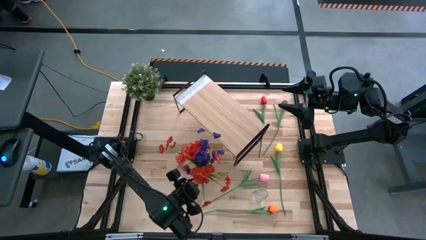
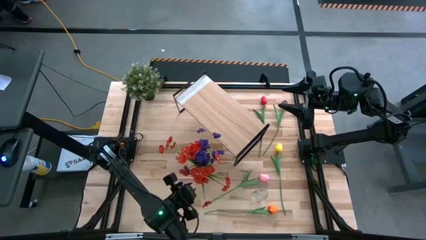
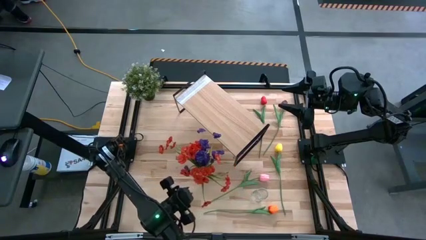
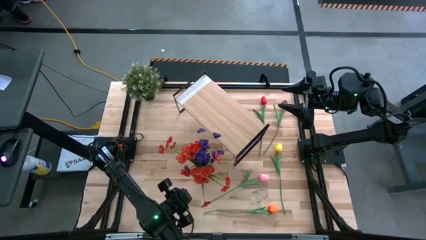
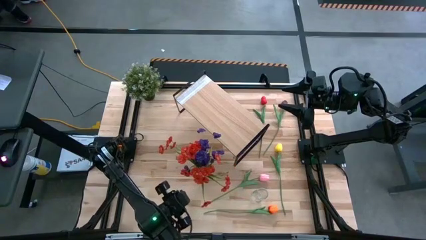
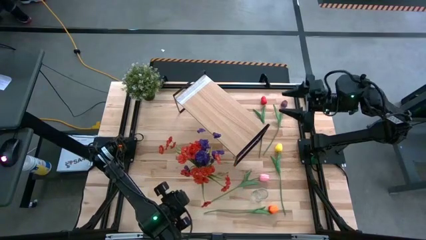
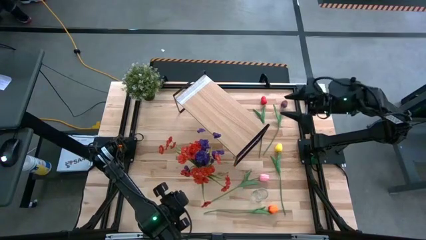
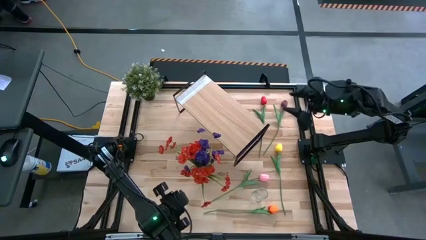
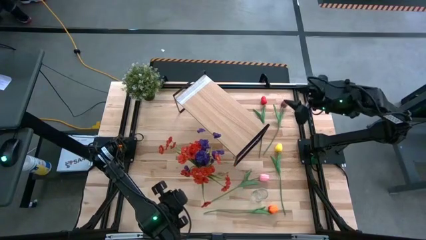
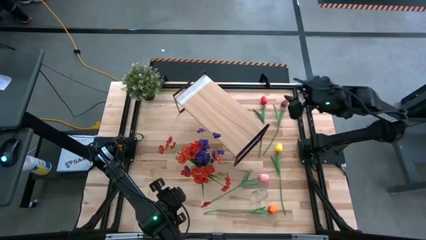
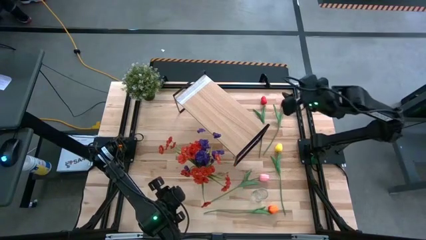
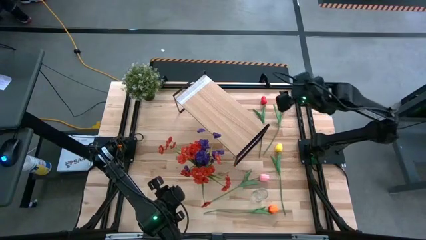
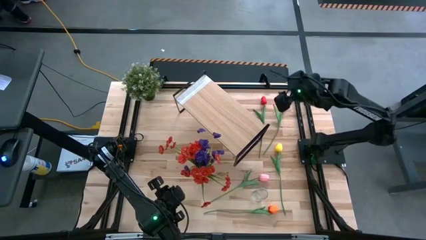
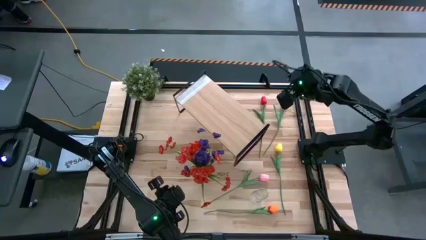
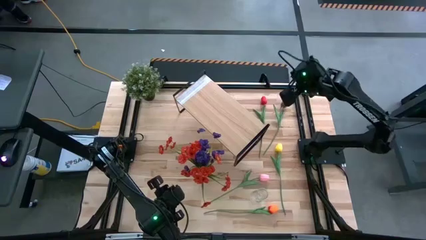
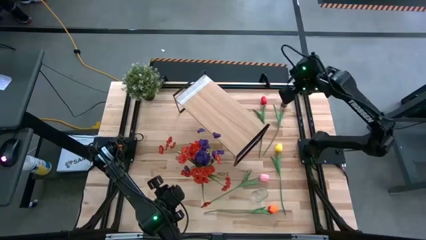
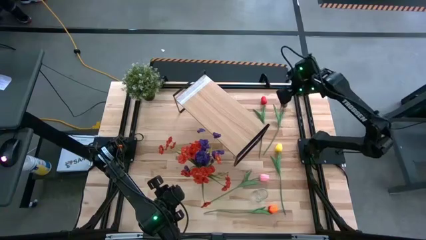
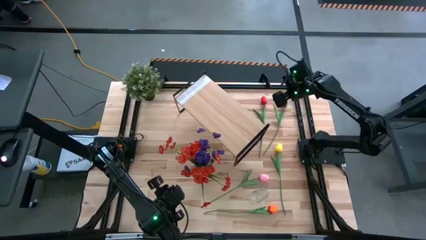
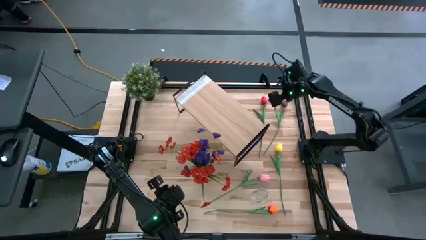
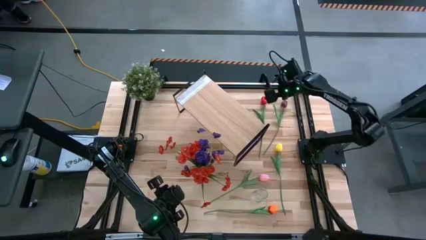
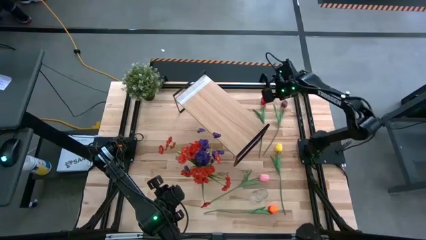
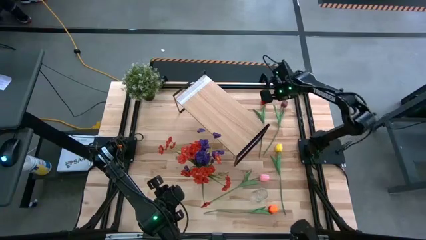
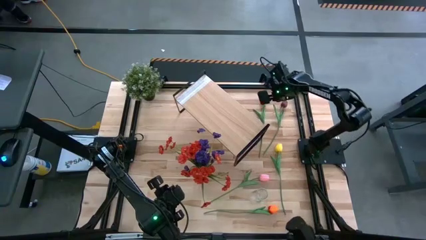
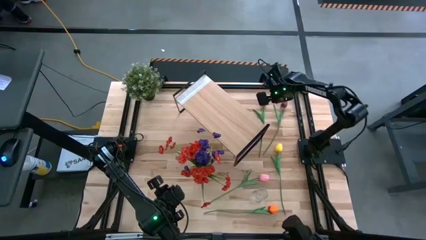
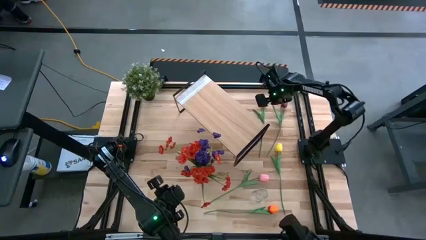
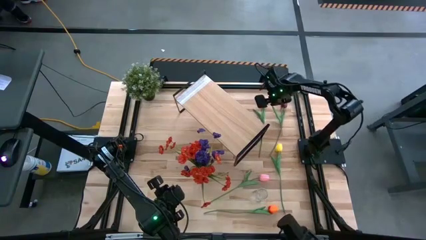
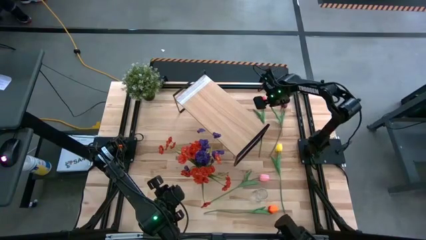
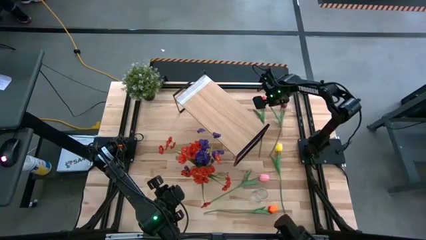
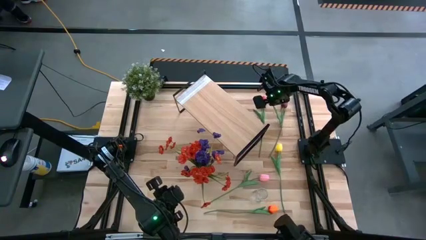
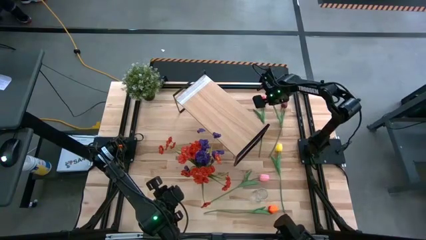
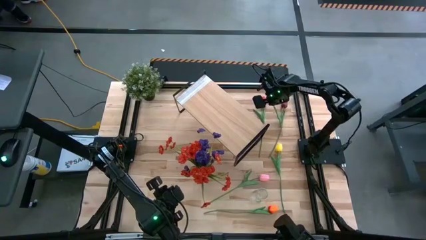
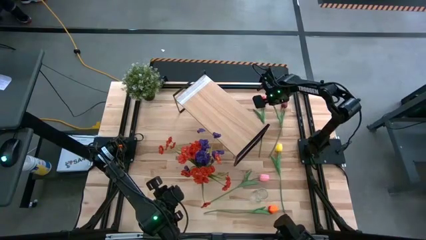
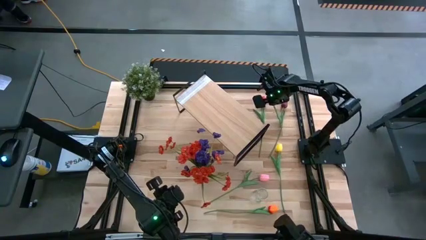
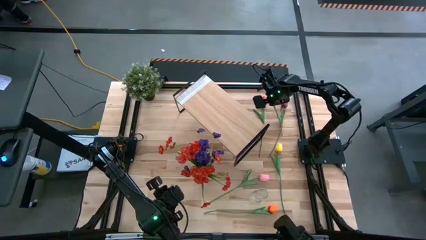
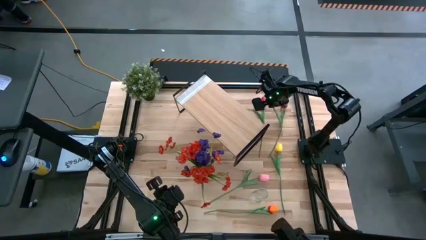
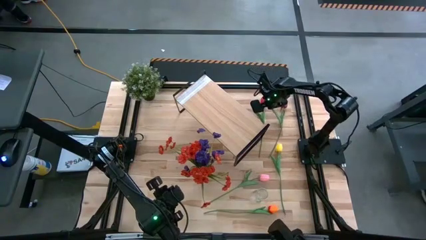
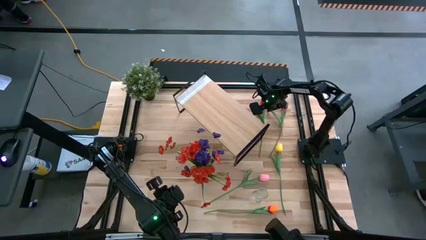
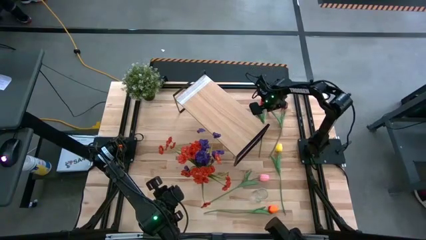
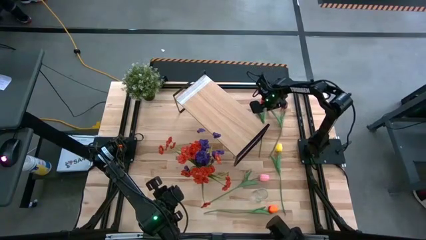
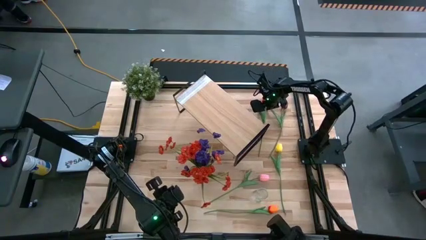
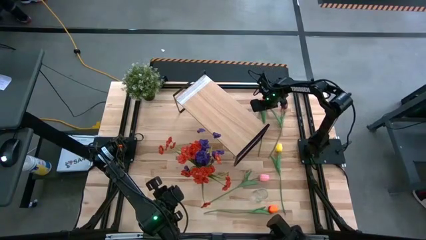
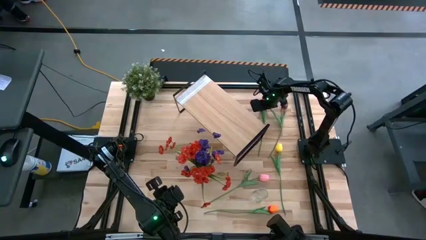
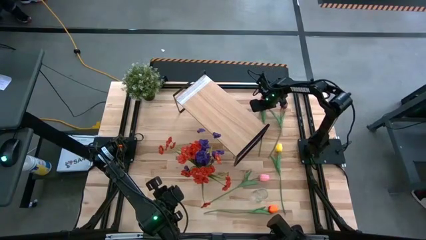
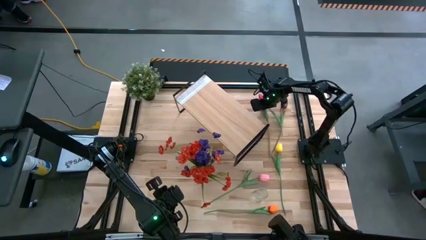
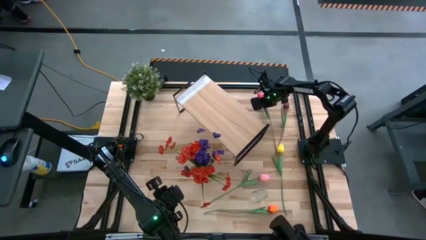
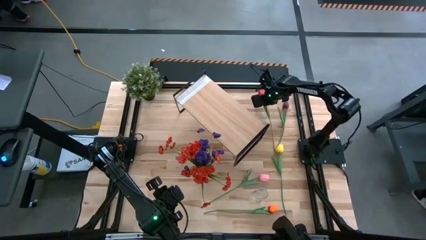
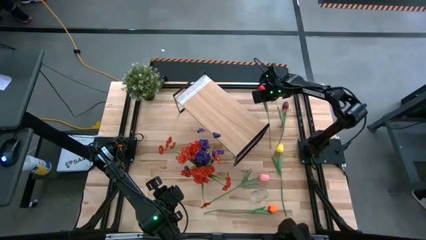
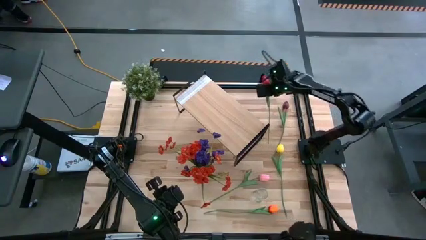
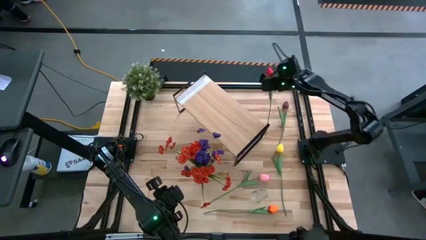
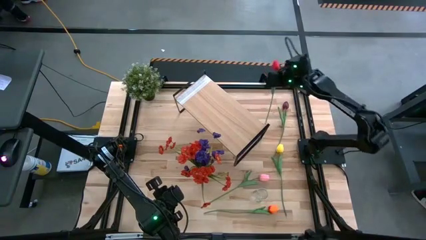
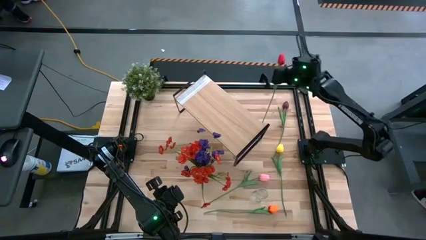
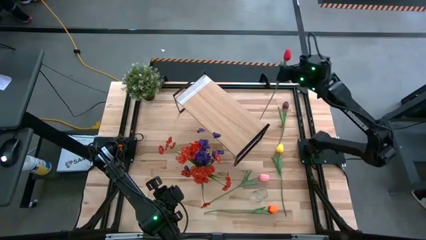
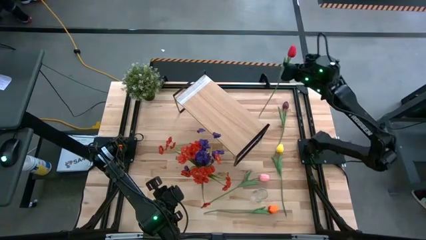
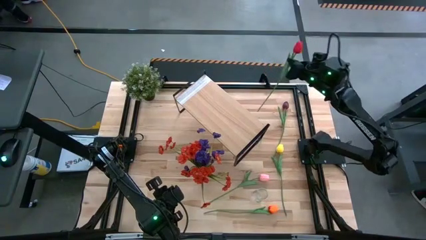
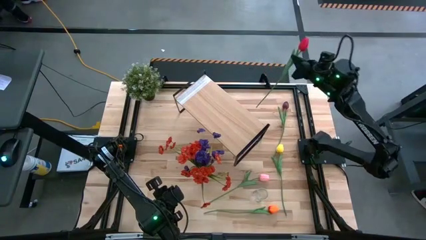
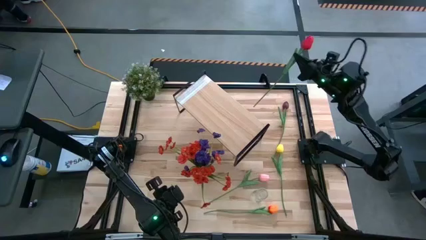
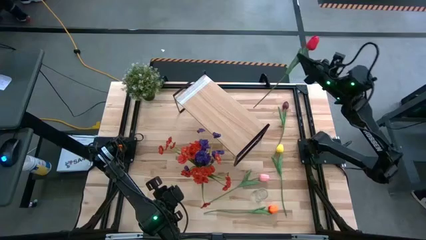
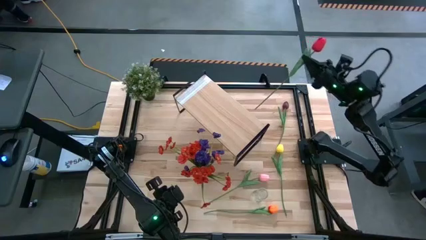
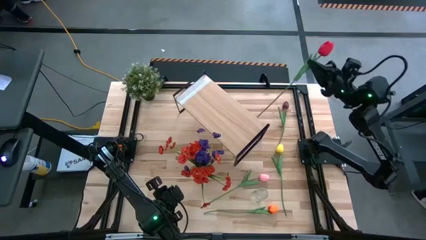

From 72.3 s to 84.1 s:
Task: Pick and place flowers into a vace then onto a shelf
Put the red tulip into the right transparent vase
